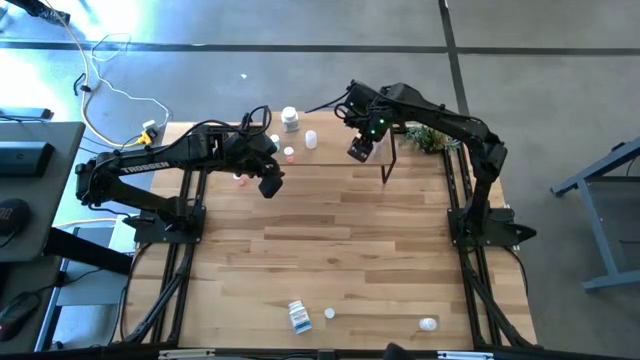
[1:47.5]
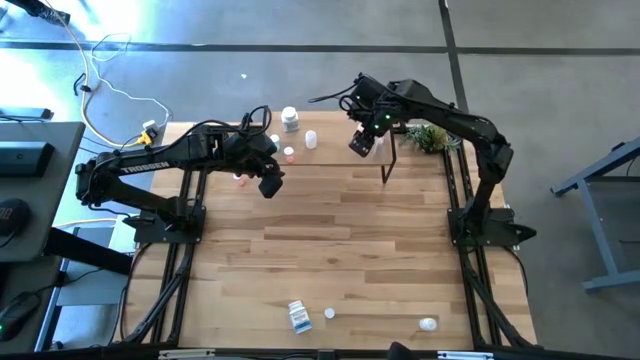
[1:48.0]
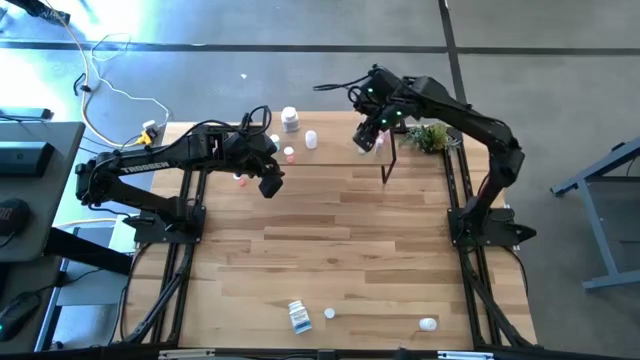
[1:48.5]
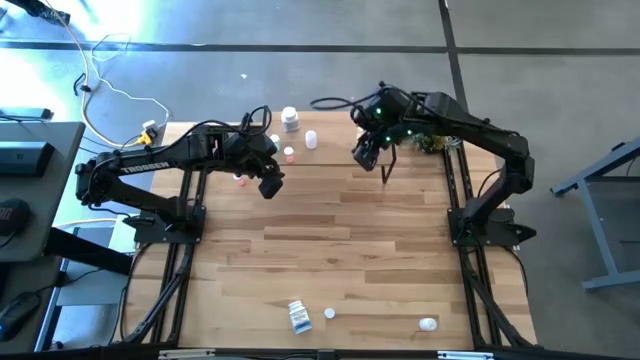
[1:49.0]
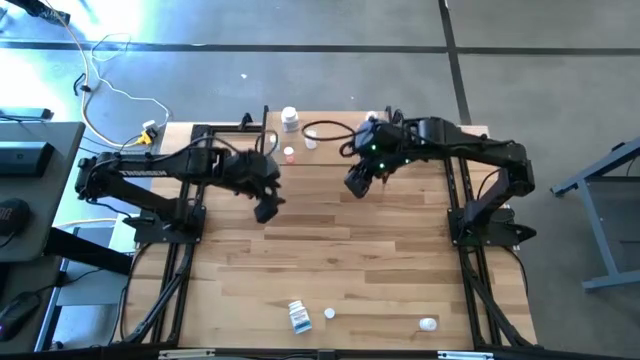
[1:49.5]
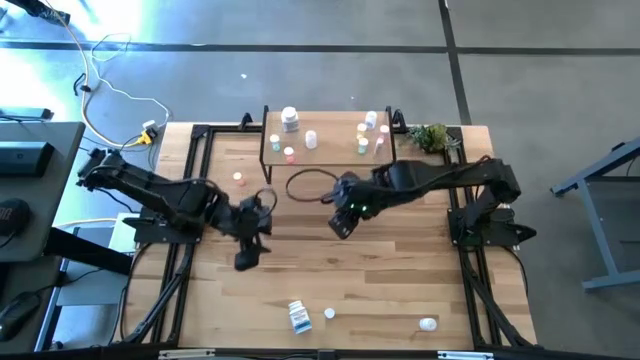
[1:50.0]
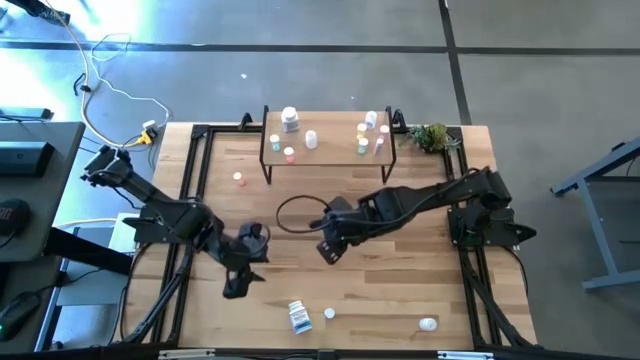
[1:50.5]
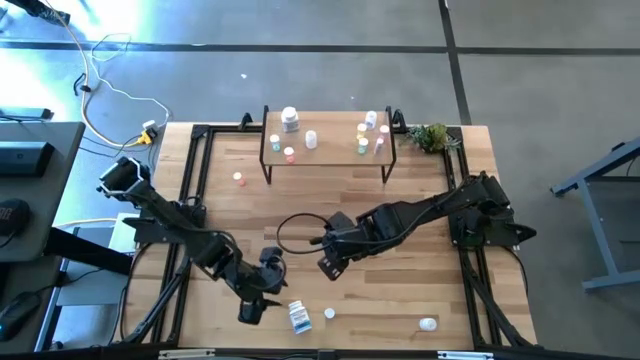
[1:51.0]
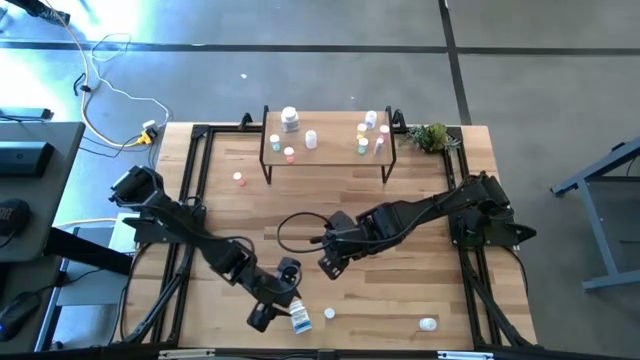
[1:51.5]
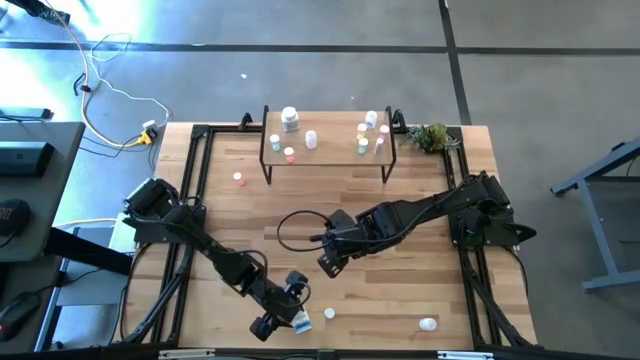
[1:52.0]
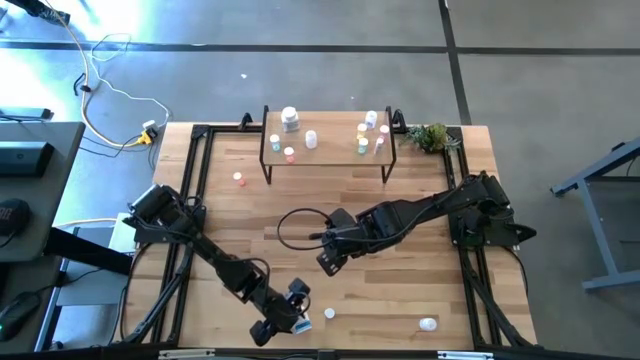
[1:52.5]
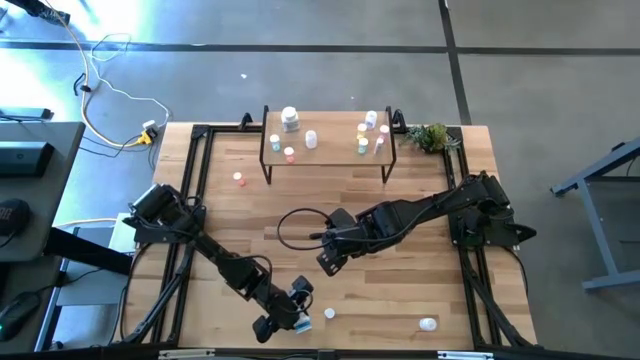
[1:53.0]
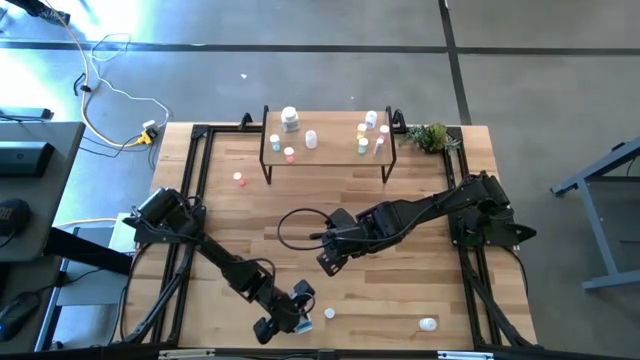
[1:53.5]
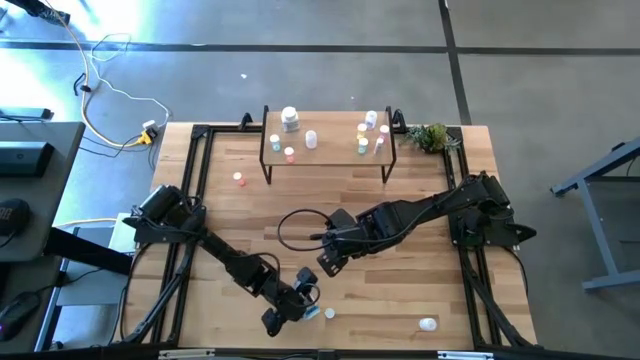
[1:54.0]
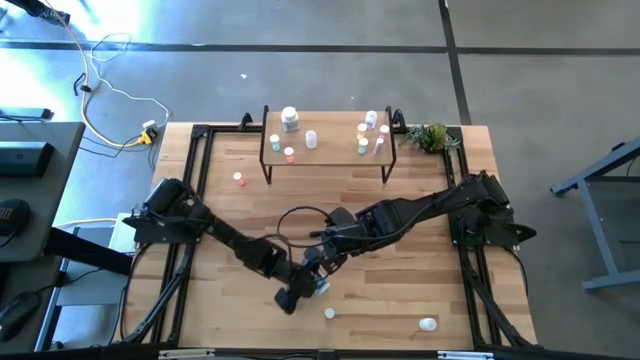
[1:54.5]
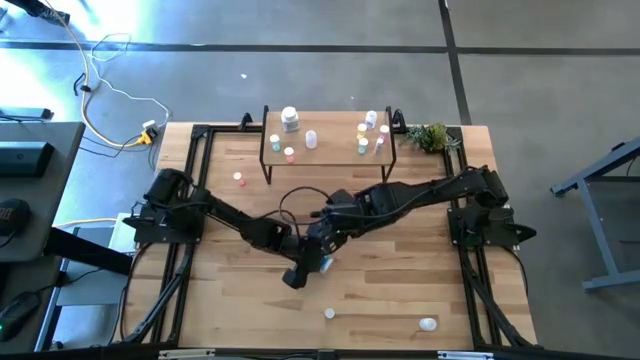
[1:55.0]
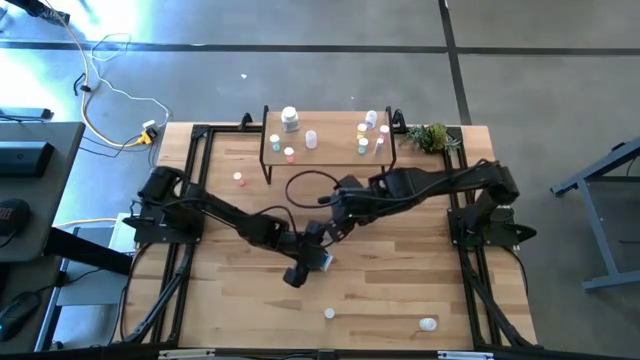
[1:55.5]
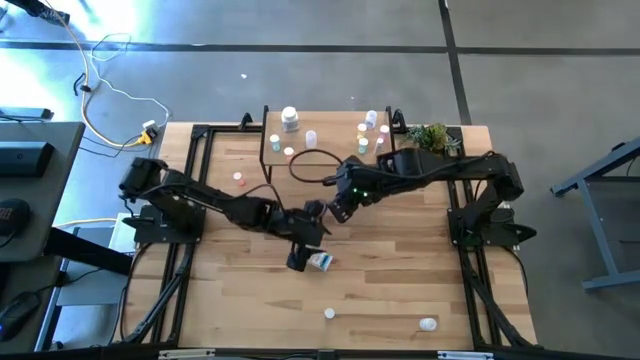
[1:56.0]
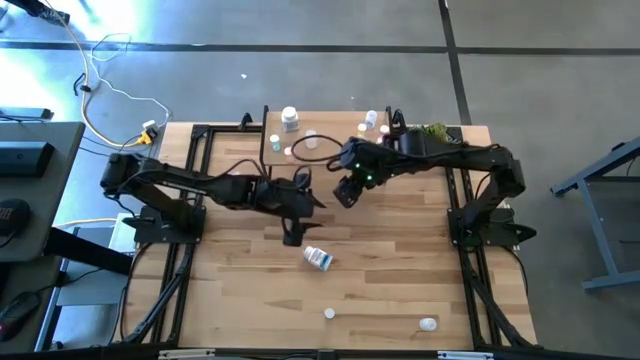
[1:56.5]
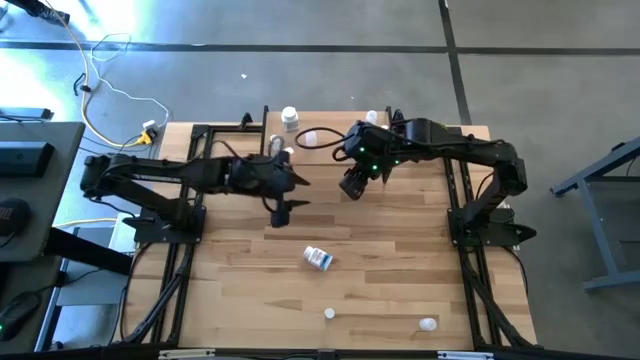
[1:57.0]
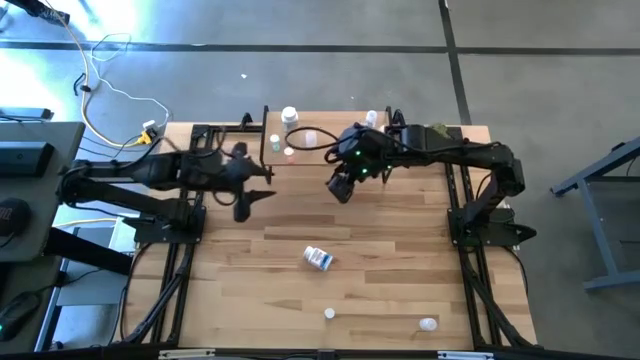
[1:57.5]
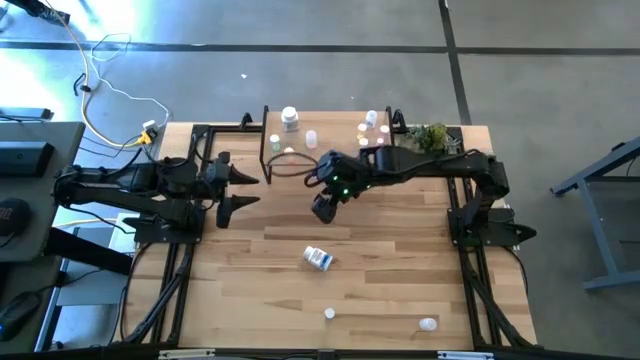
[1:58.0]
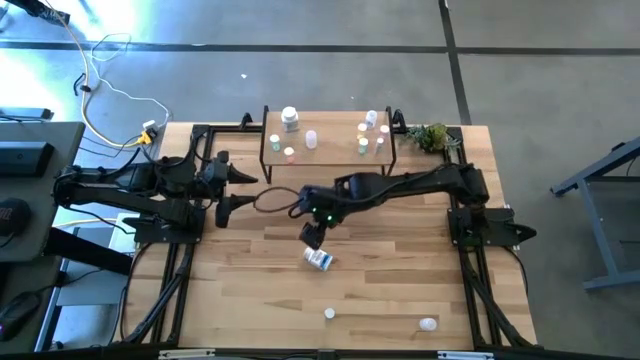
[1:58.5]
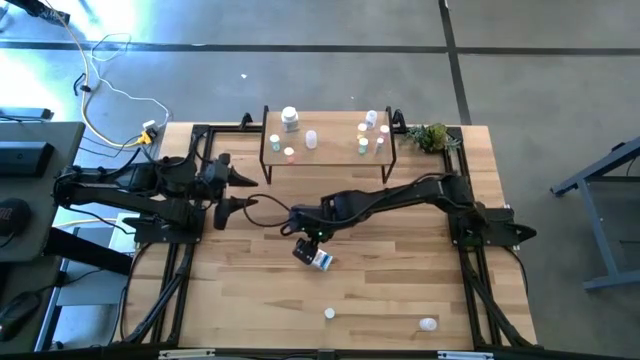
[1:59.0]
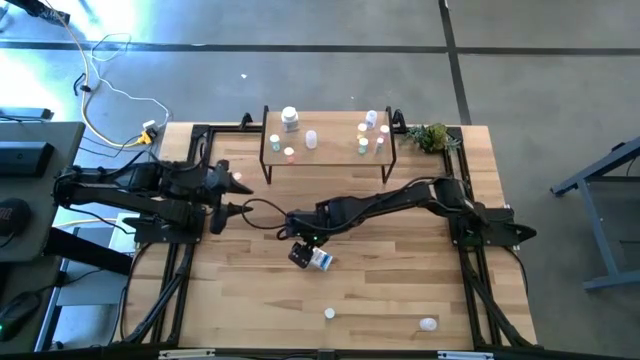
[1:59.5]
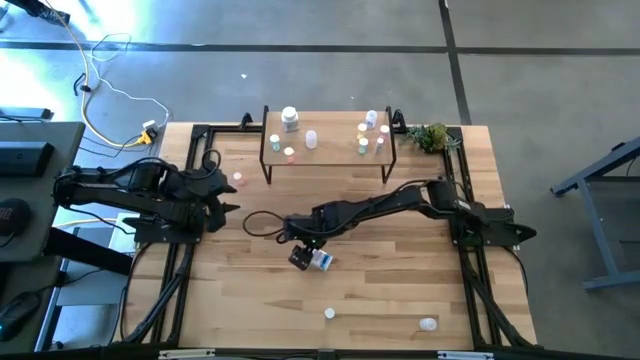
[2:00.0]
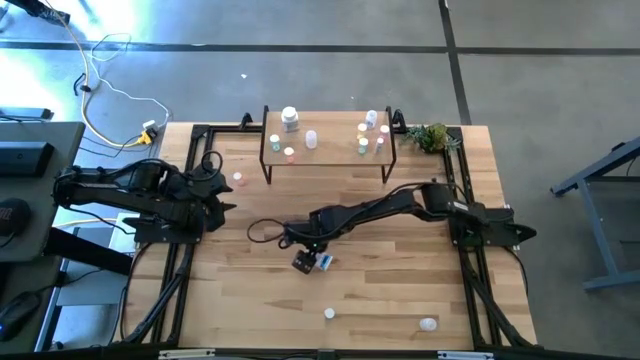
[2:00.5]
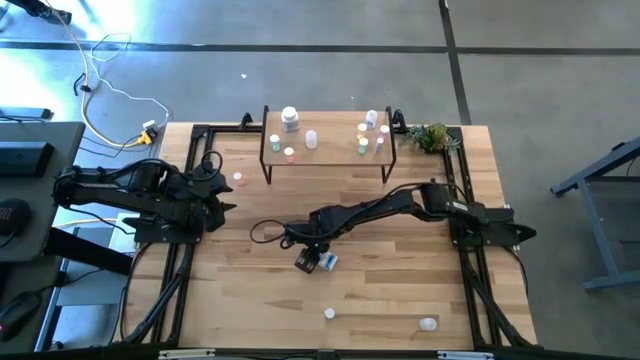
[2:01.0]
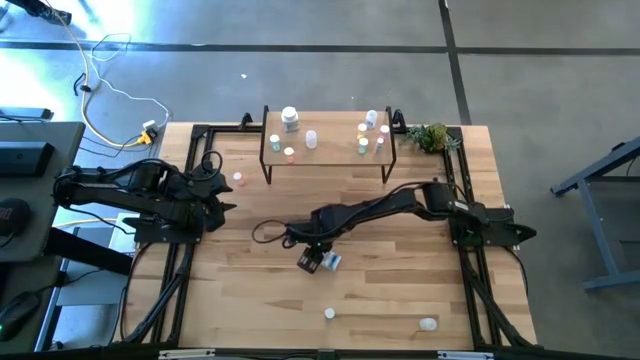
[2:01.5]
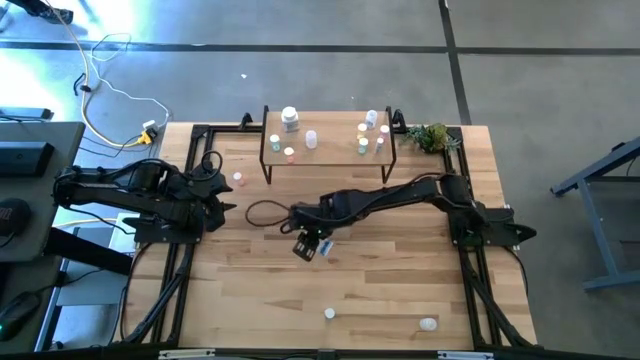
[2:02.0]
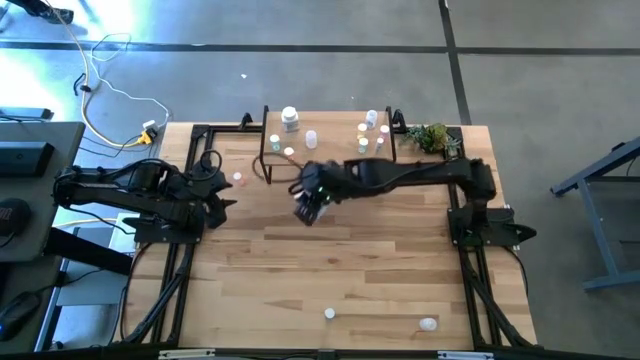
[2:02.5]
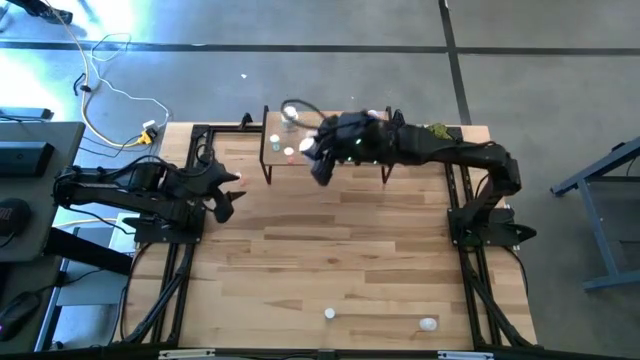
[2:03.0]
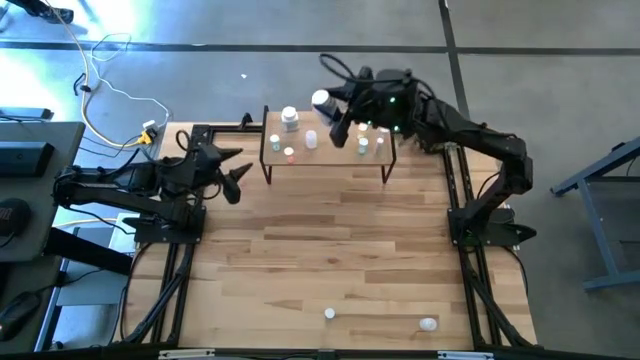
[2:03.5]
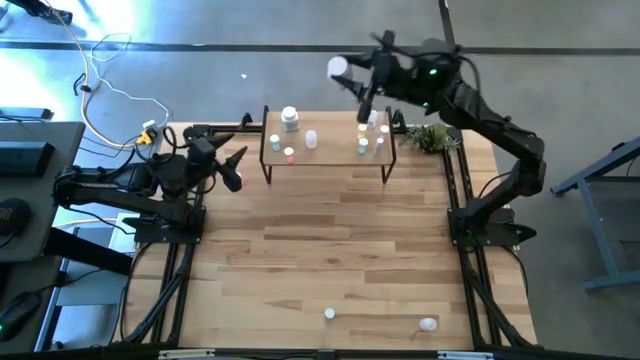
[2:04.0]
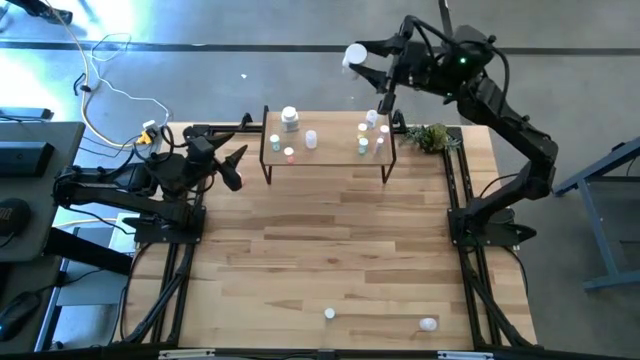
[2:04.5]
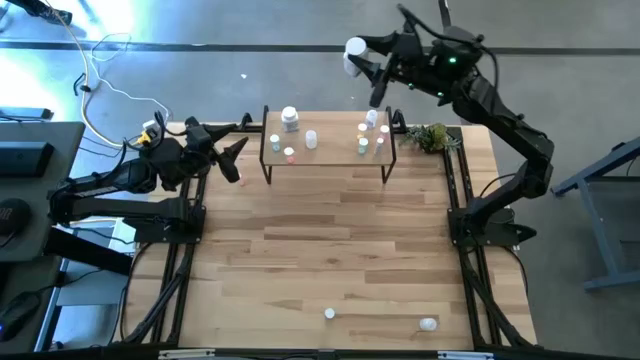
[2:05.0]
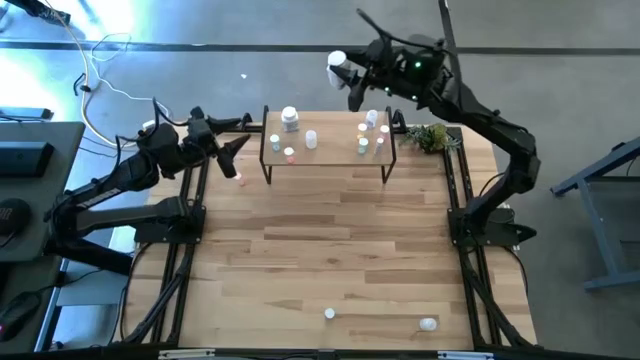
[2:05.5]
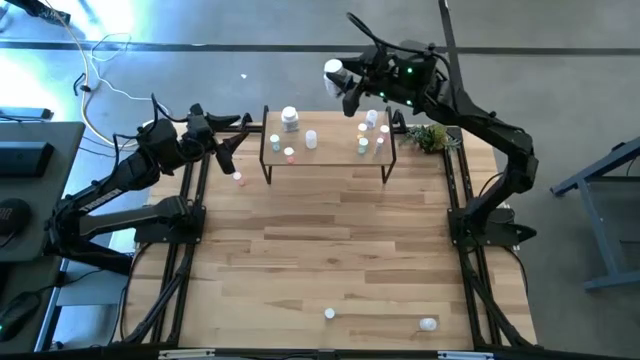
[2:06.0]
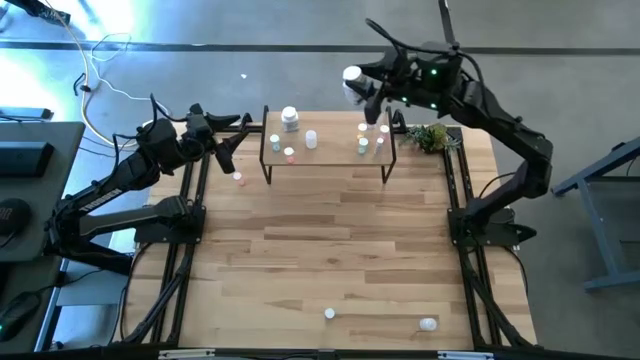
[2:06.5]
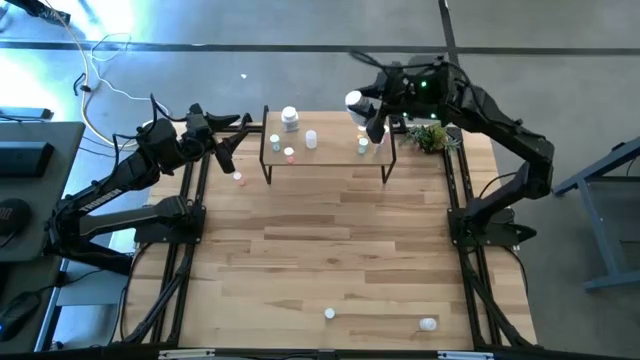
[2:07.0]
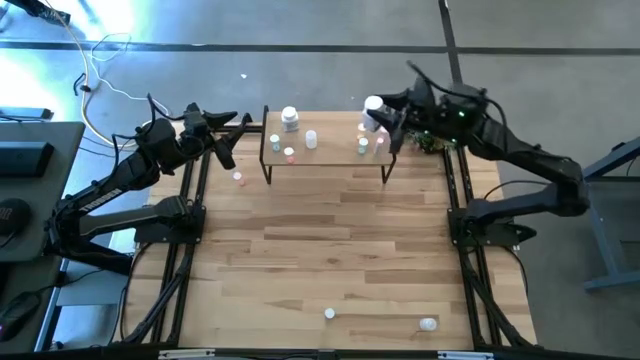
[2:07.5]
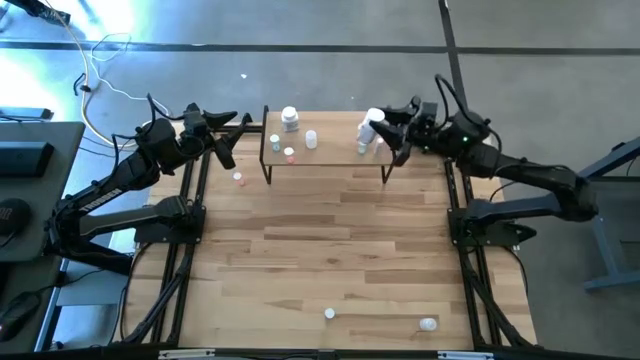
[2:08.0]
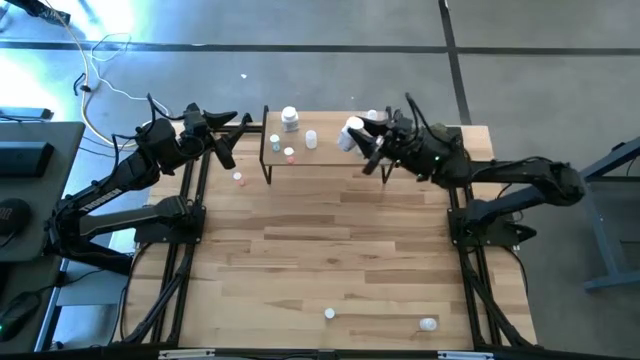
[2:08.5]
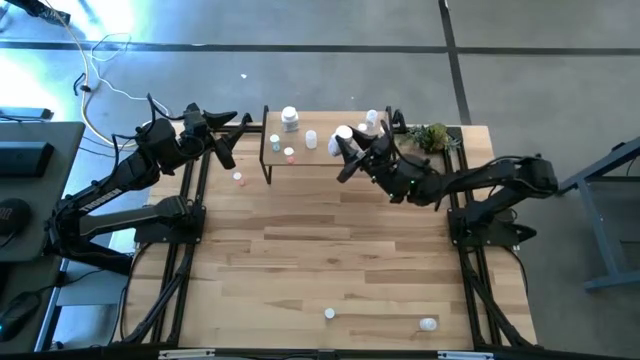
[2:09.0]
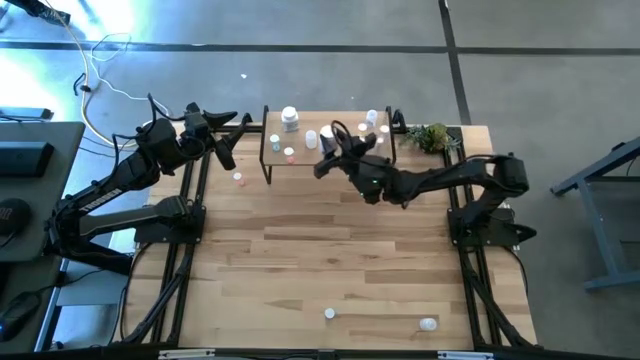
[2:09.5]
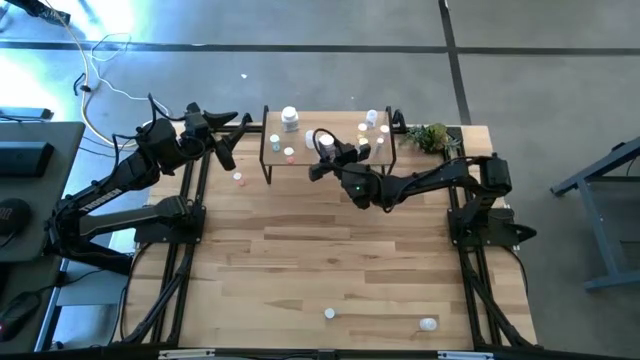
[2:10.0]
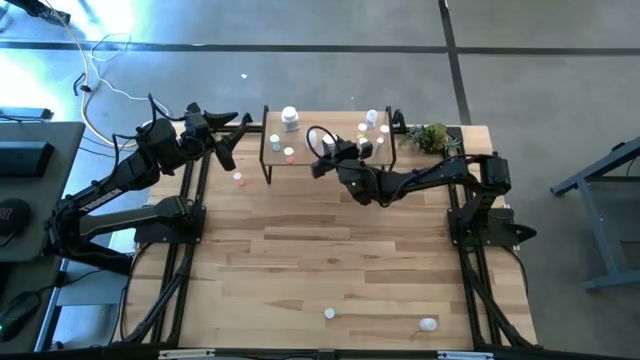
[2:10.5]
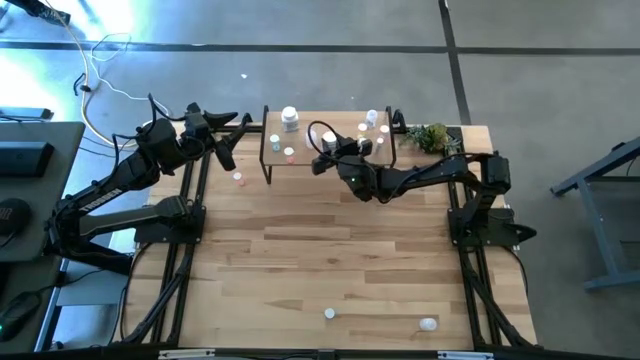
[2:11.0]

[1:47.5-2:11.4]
Task: Pick and place medicine bottles onto shelf by color
Put the white pill bottle on the shelf
